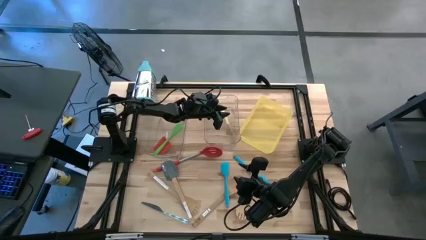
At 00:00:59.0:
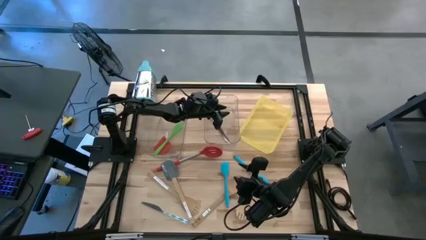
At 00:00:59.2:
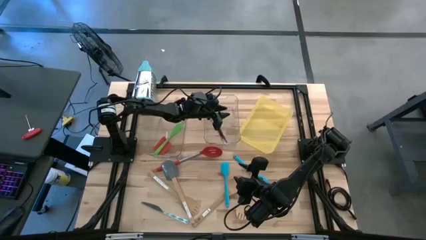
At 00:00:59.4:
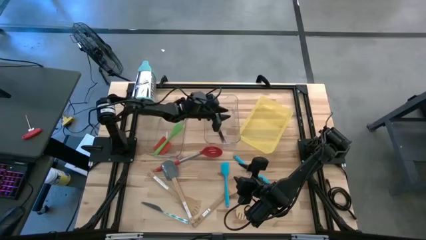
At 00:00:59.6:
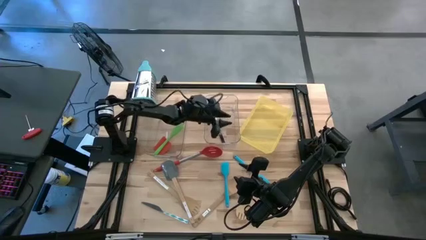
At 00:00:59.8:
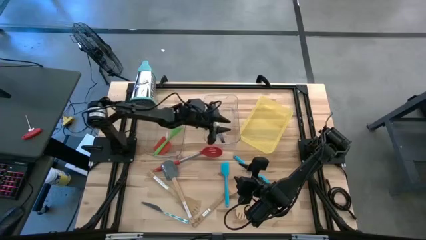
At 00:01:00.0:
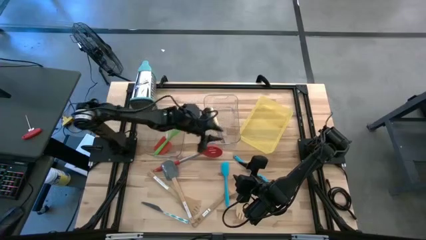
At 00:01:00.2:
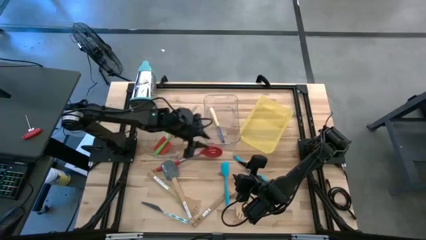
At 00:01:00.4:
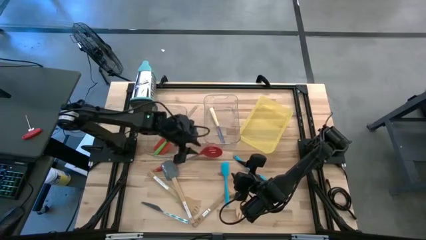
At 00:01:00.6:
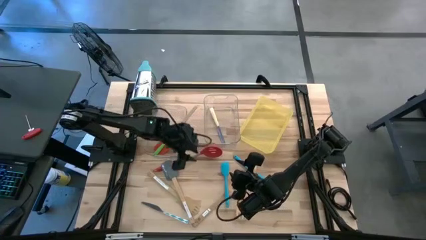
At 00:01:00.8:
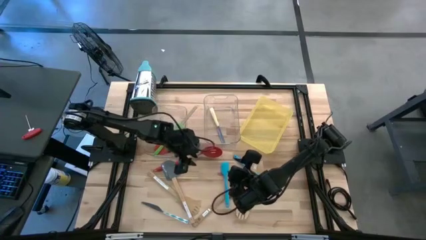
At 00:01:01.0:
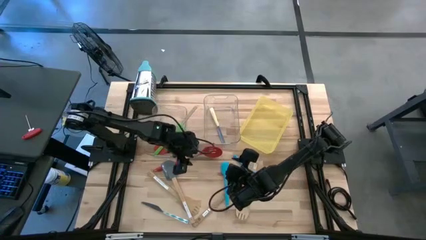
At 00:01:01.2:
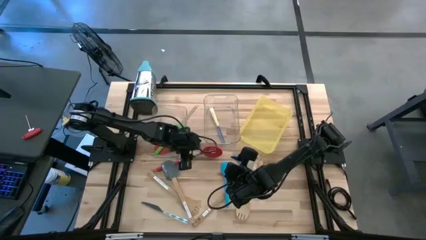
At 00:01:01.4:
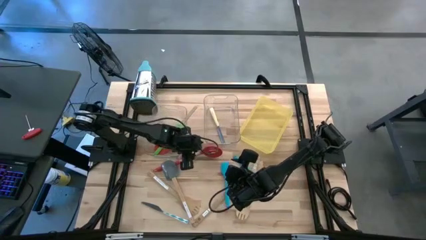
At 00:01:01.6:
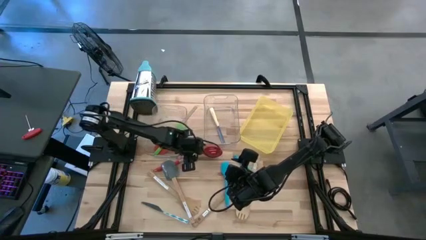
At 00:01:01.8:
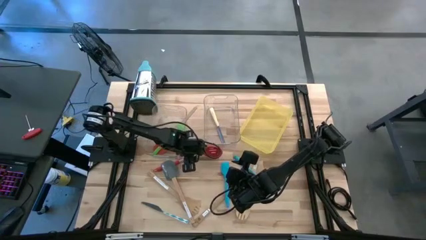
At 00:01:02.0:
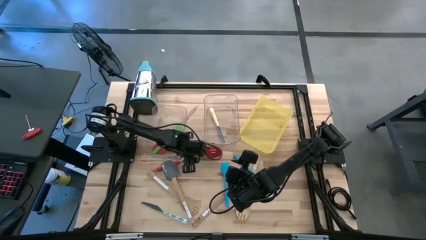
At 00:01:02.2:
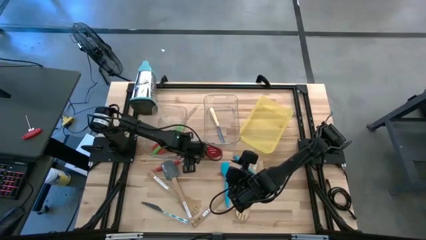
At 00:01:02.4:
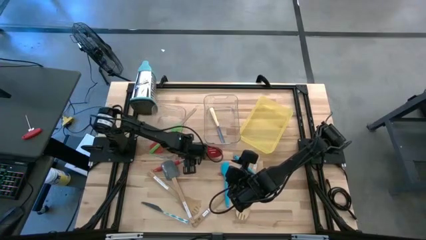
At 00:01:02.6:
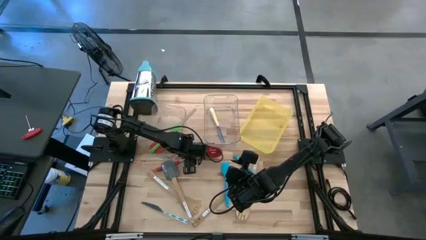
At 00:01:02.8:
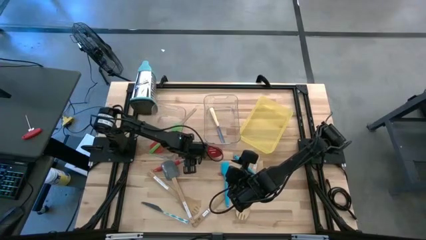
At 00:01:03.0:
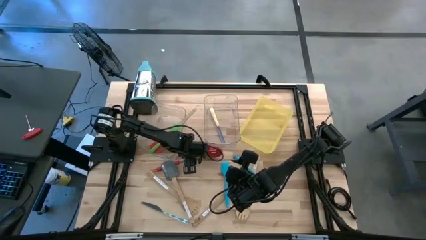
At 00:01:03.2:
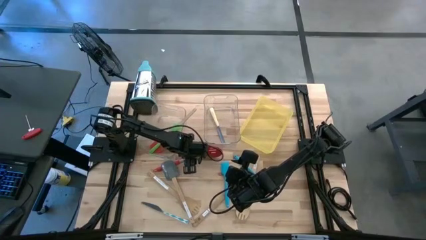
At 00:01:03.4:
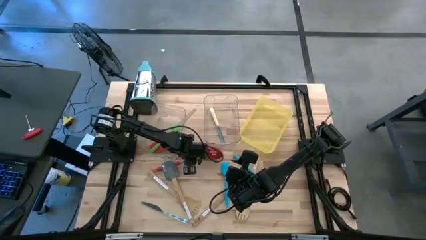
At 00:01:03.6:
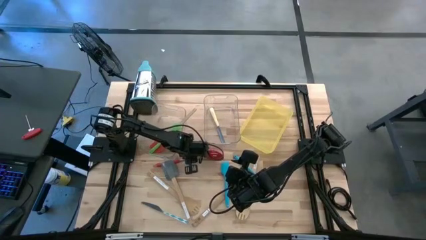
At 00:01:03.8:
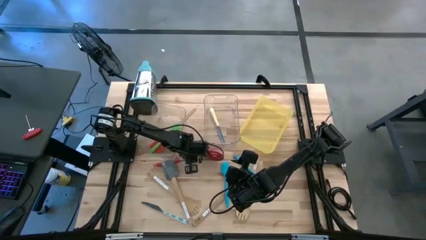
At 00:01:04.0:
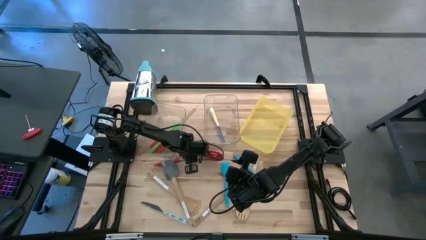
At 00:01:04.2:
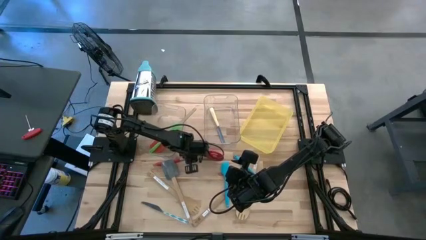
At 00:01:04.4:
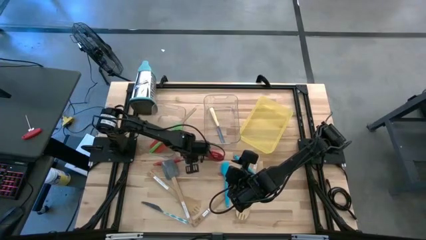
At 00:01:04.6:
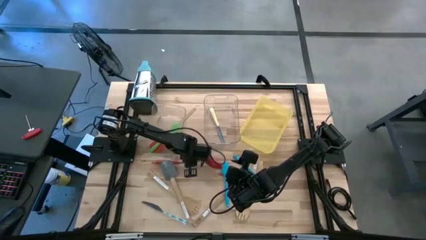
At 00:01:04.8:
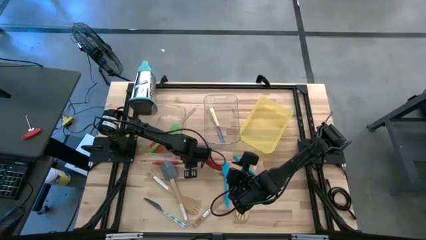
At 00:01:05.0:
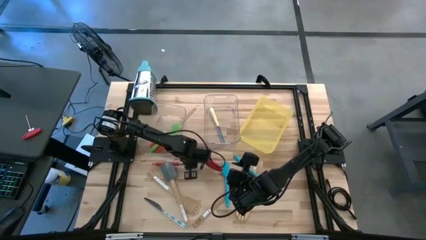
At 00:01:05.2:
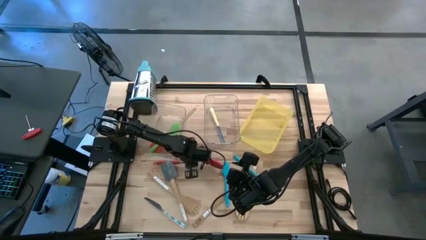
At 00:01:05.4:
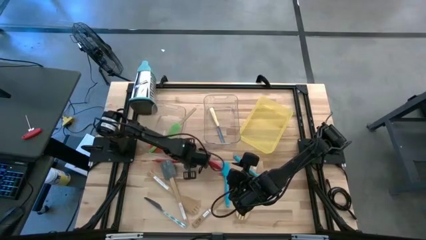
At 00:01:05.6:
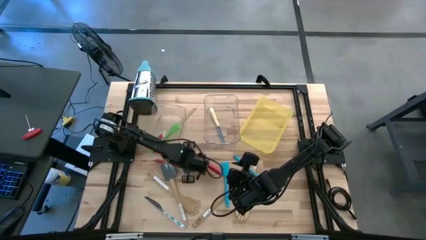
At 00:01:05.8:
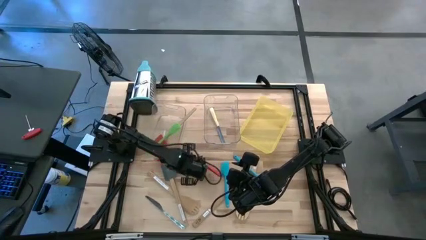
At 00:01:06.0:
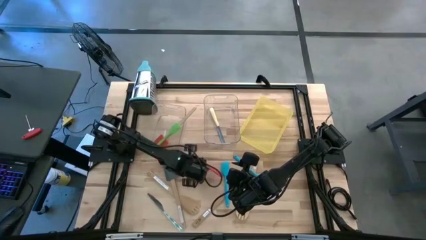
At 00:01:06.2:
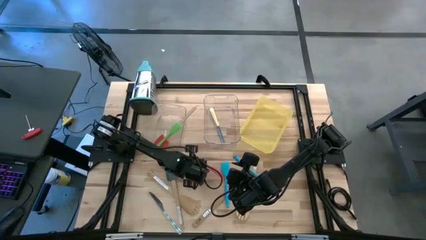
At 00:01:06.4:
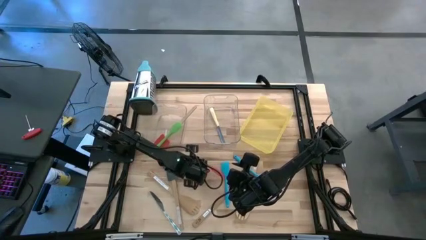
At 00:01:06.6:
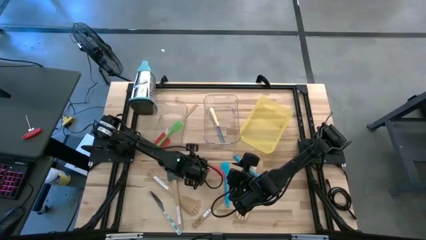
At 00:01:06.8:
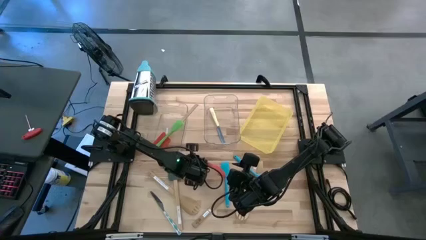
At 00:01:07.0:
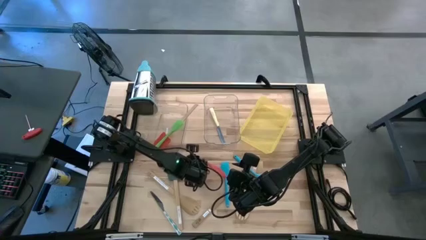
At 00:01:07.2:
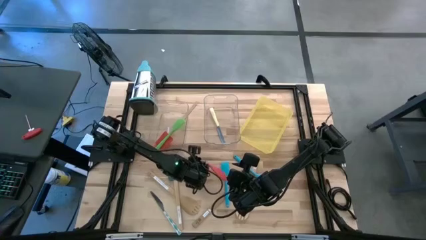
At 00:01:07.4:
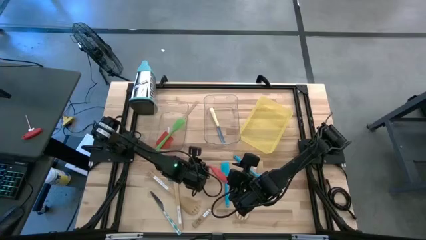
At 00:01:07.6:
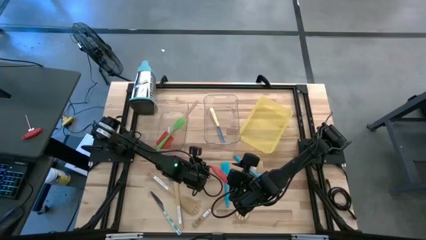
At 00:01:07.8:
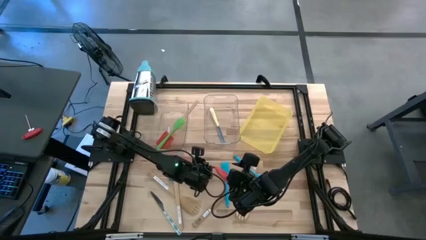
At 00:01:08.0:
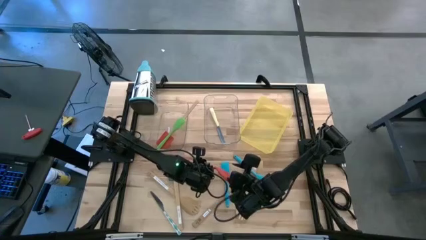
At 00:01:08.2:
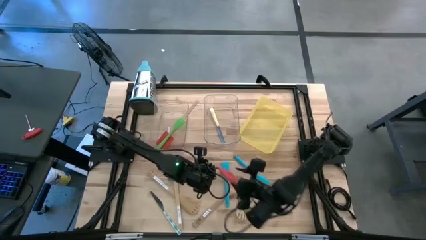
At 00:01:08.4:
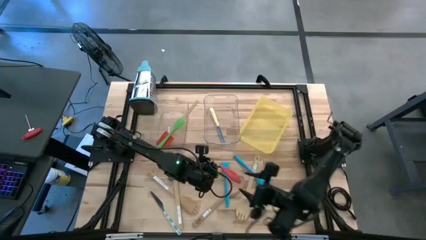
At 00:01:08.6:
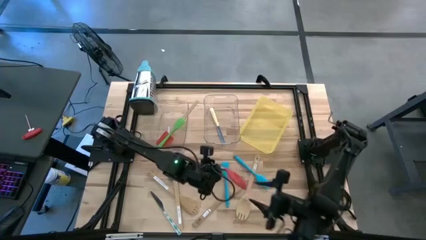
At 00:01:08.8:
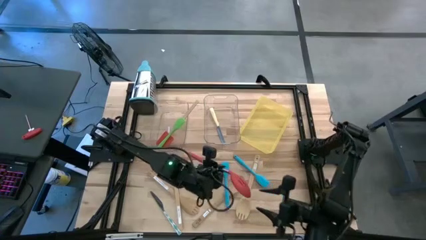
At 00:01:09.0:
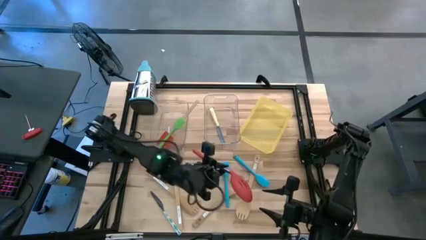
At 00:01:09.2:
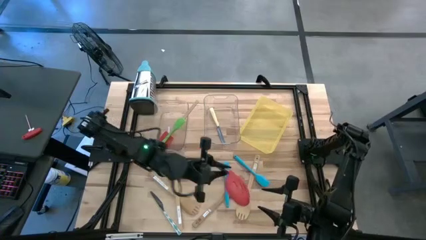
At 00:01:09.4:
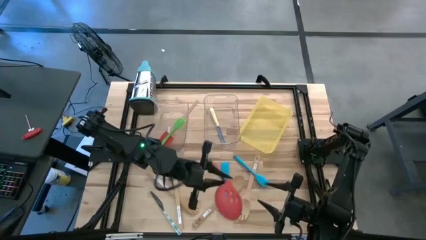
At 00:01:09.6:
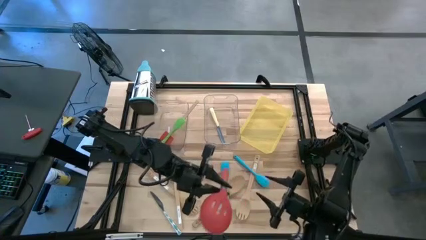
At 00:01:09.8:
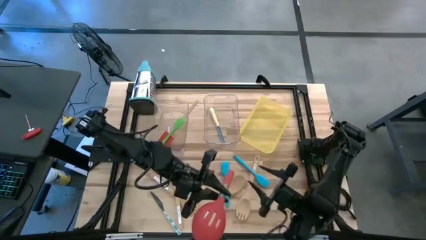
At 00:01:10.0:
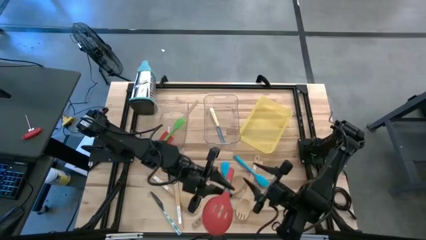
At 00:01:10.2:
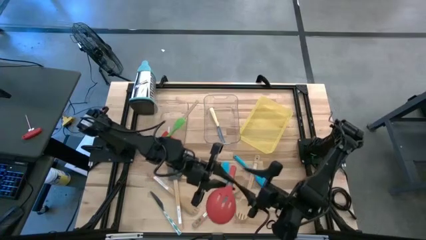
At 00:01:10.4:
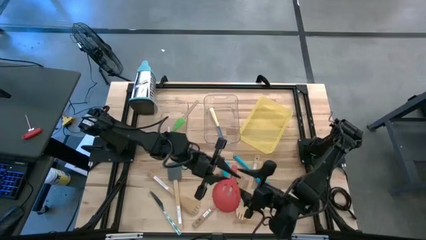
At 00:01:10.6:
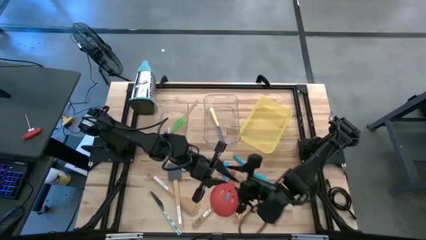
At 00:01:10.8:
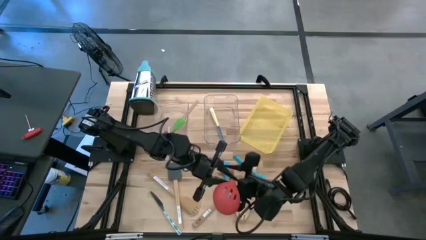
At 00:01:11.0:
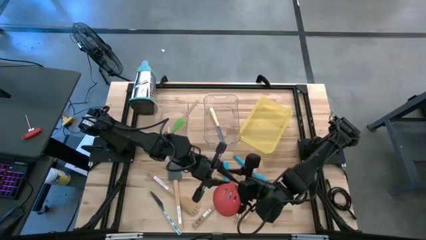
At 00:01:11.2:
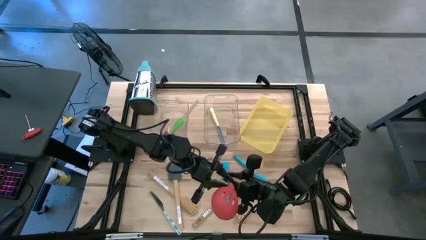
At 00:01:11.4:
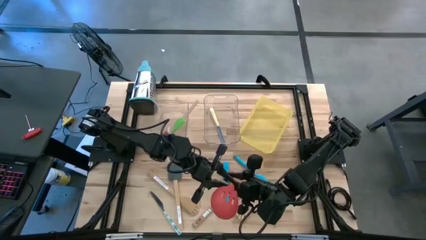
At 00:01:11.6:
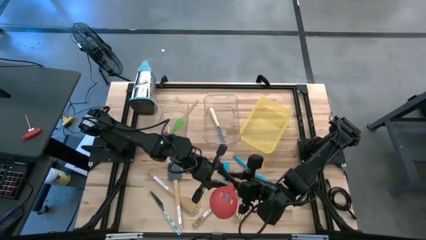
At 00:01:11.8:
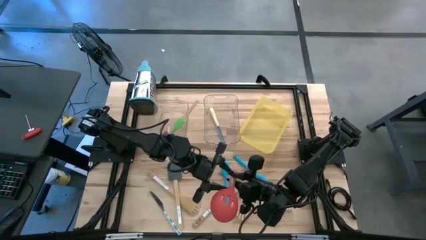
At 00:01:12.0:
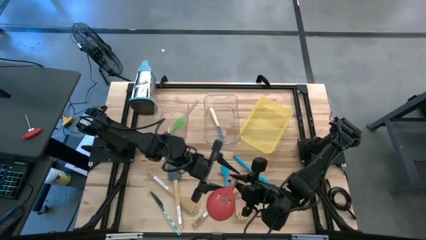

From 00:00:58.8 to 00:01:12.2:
Task: Pick & Place Kitchen Items
Put the red slotted spoon into the yellow bin
